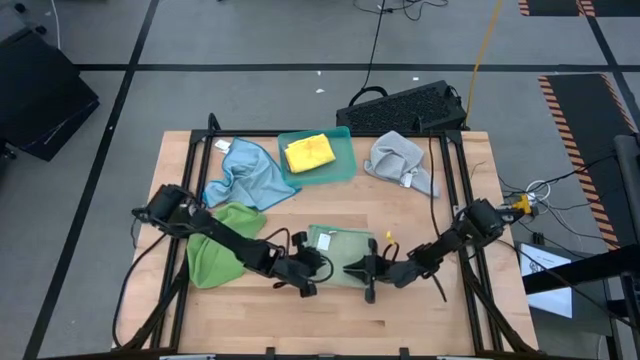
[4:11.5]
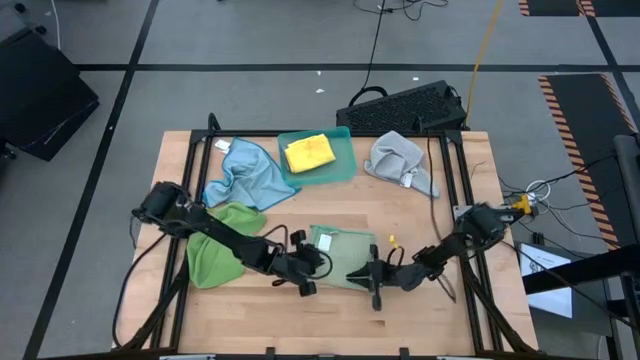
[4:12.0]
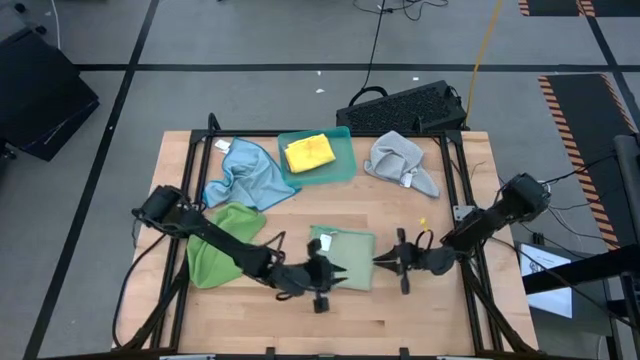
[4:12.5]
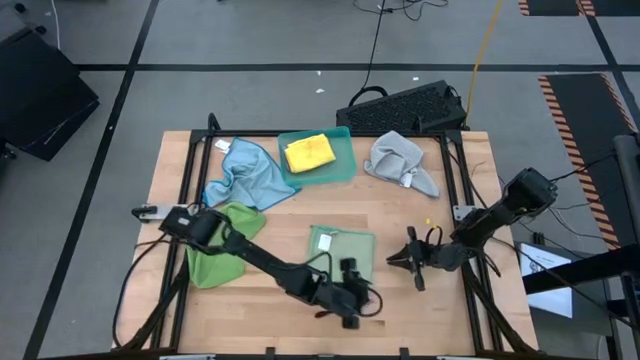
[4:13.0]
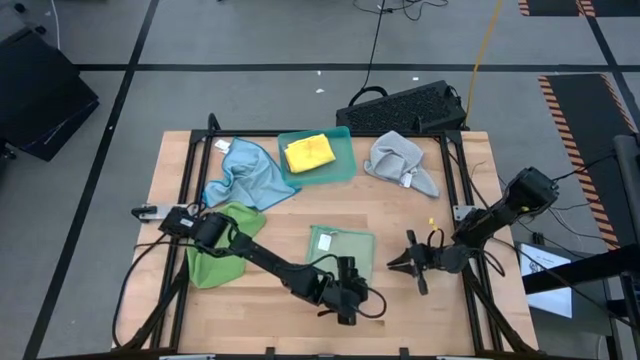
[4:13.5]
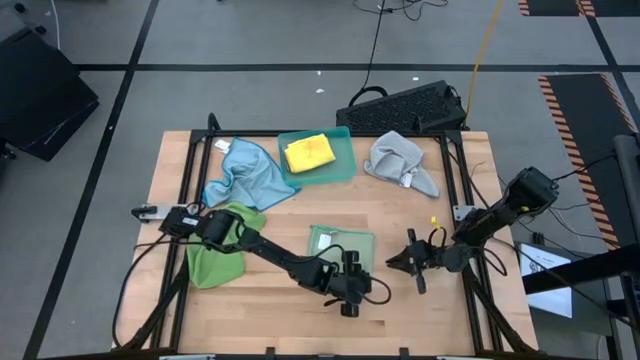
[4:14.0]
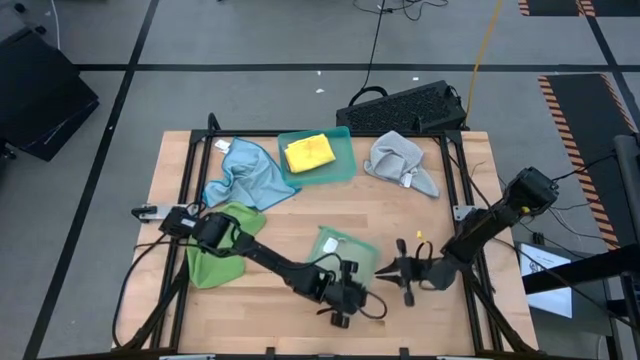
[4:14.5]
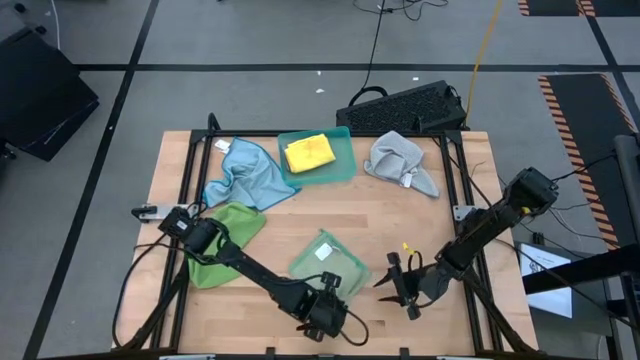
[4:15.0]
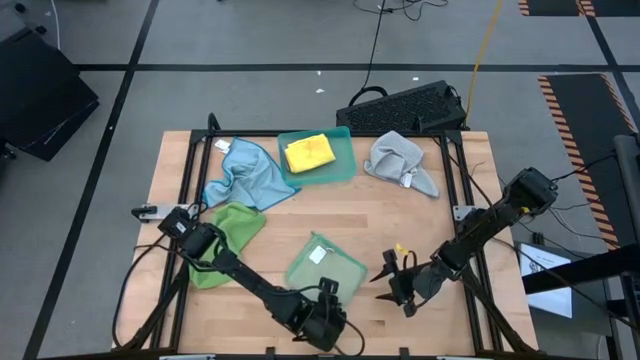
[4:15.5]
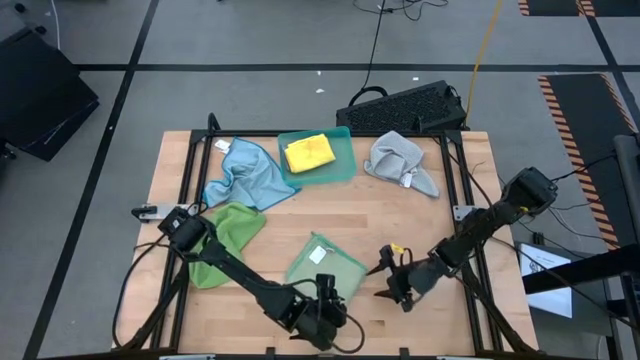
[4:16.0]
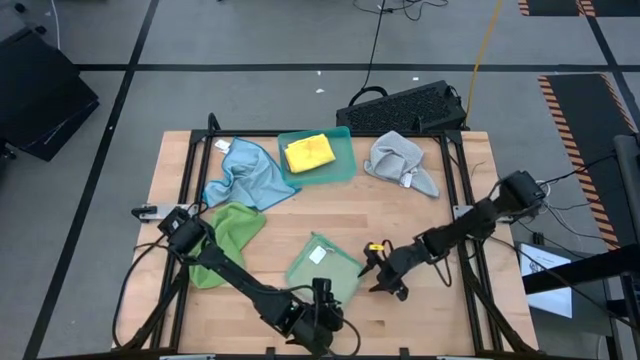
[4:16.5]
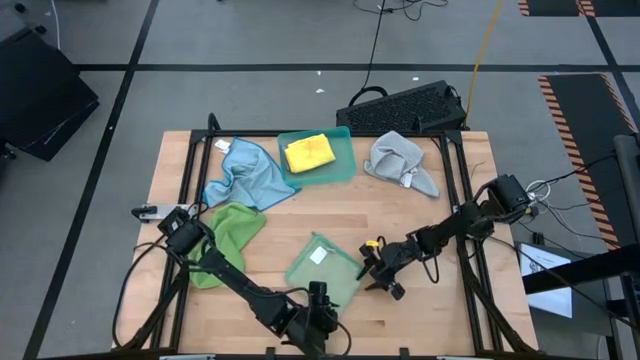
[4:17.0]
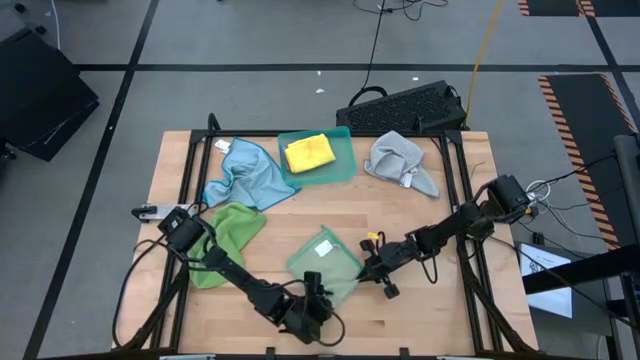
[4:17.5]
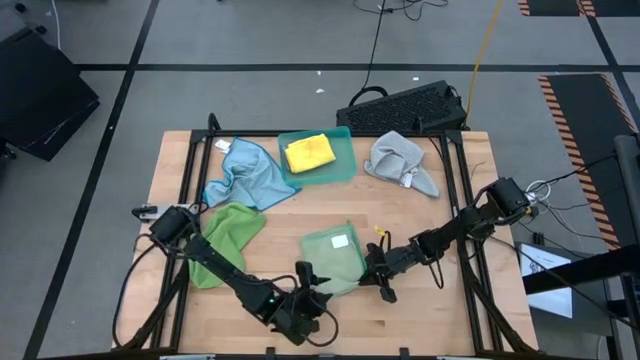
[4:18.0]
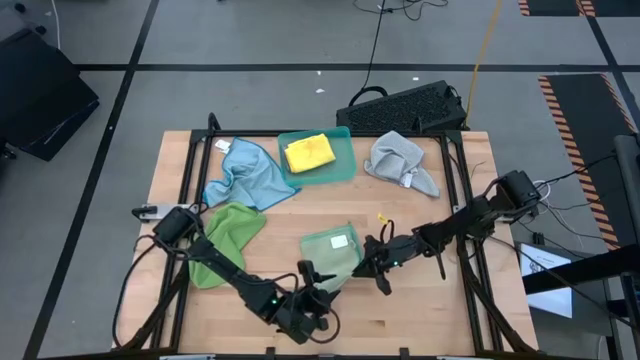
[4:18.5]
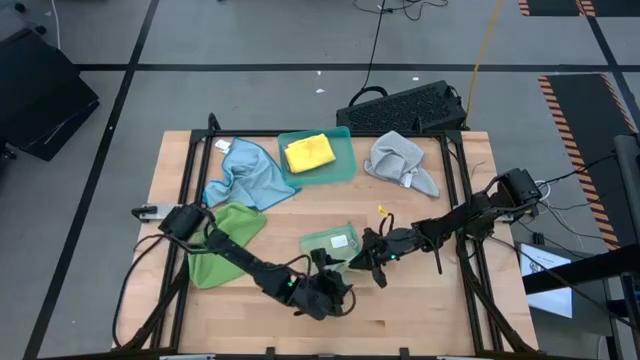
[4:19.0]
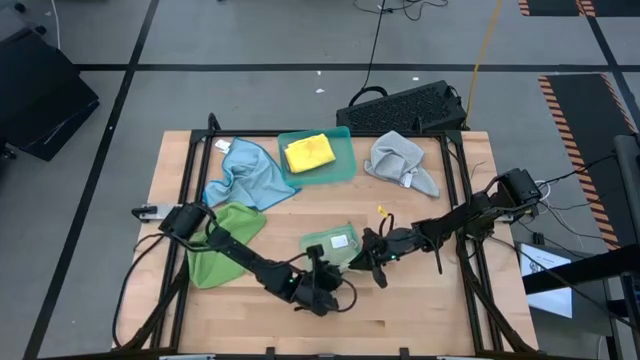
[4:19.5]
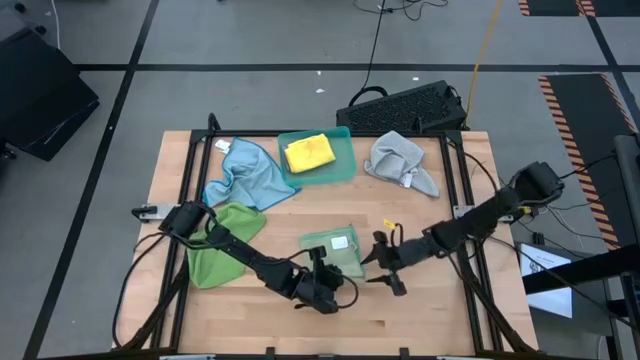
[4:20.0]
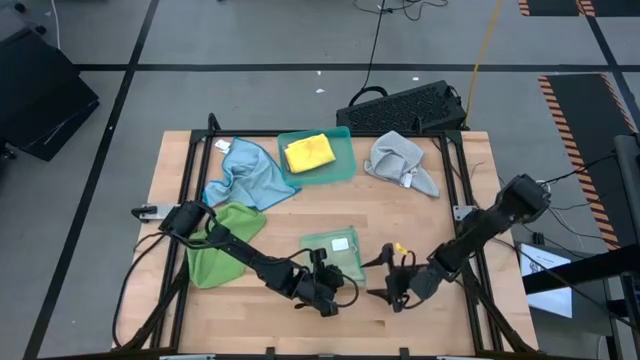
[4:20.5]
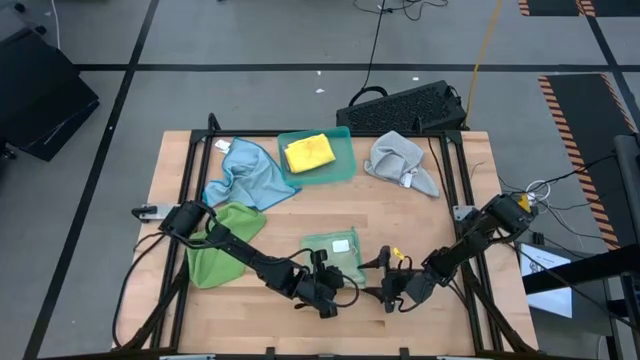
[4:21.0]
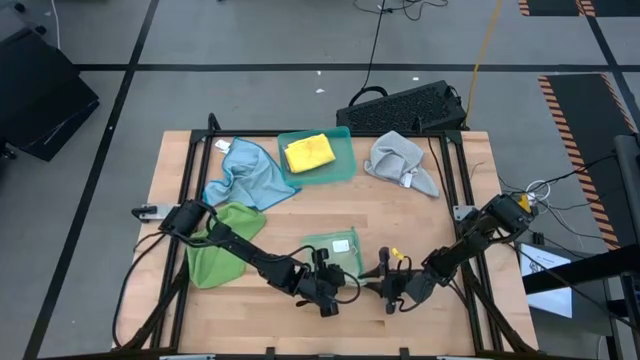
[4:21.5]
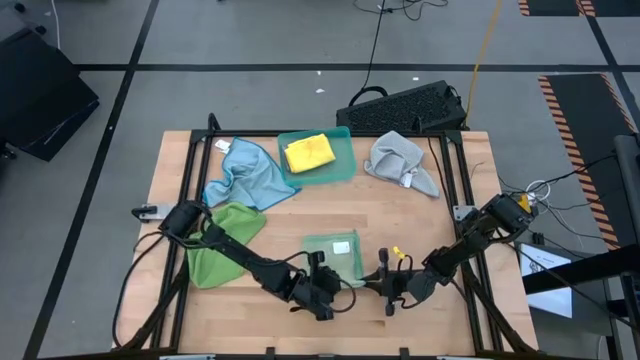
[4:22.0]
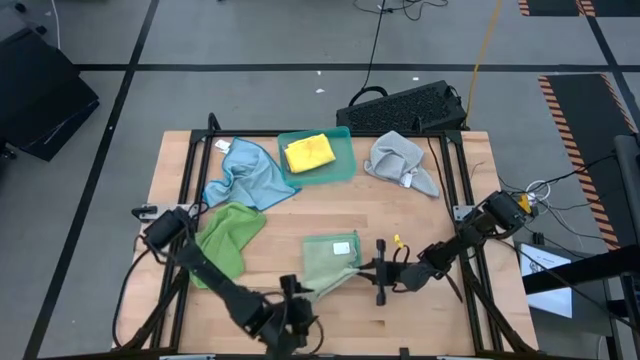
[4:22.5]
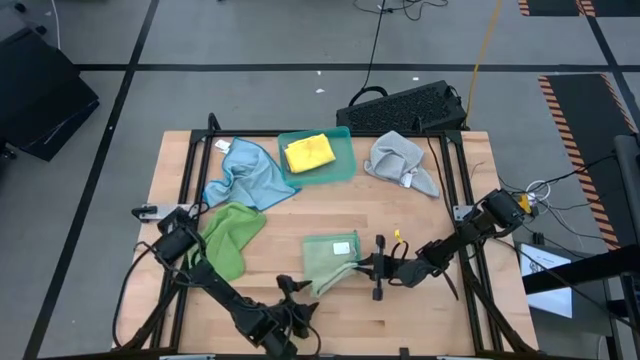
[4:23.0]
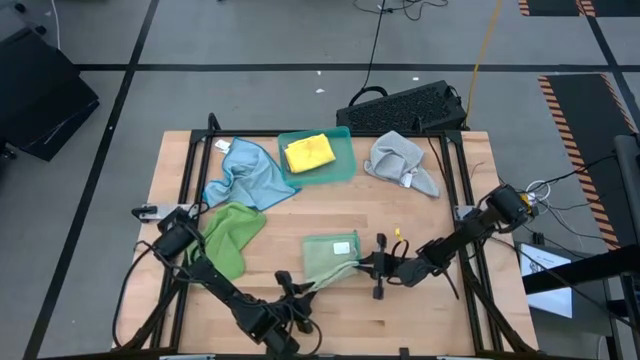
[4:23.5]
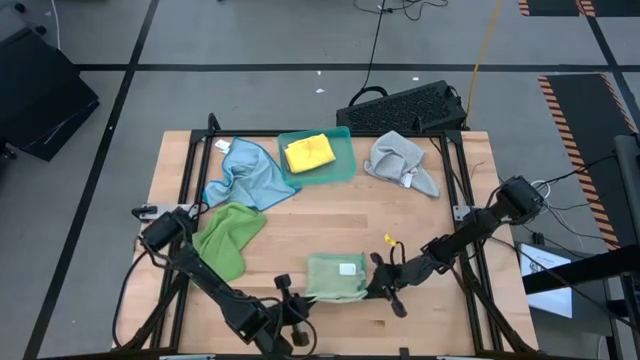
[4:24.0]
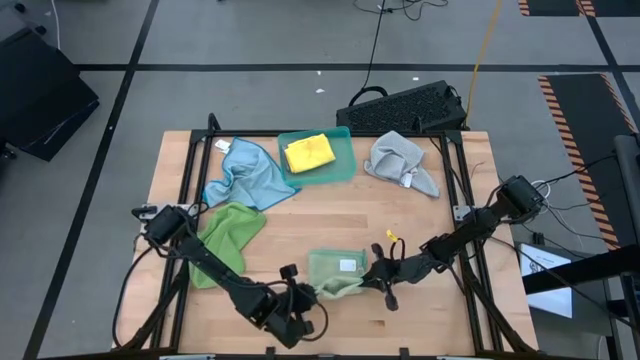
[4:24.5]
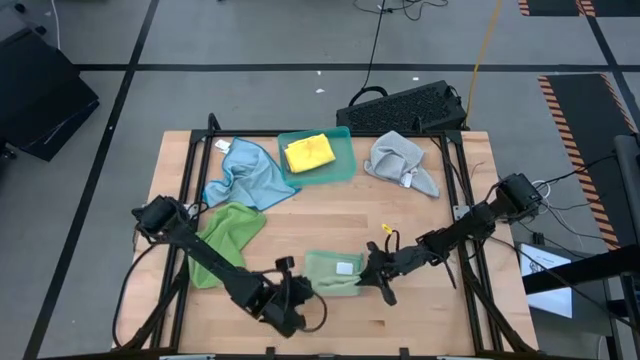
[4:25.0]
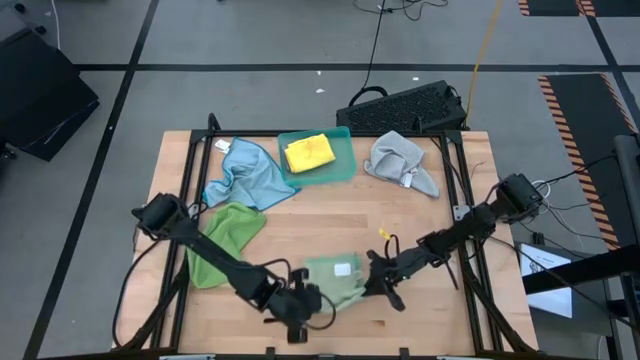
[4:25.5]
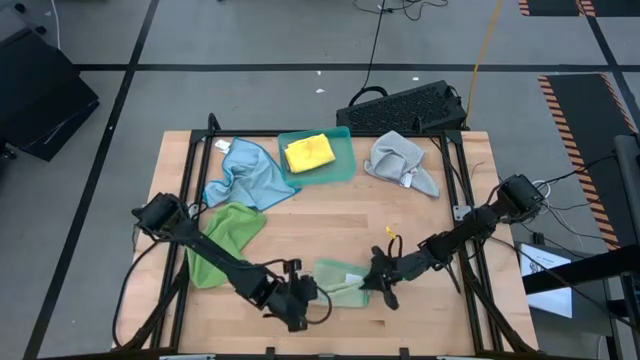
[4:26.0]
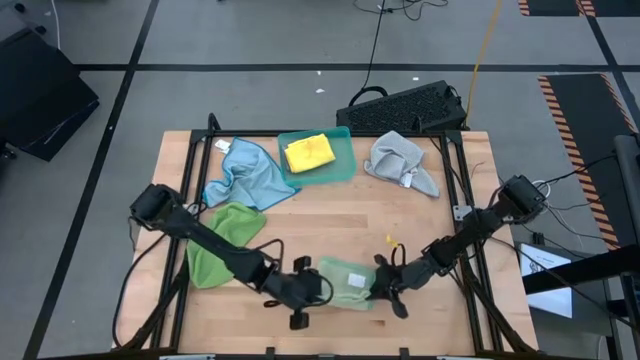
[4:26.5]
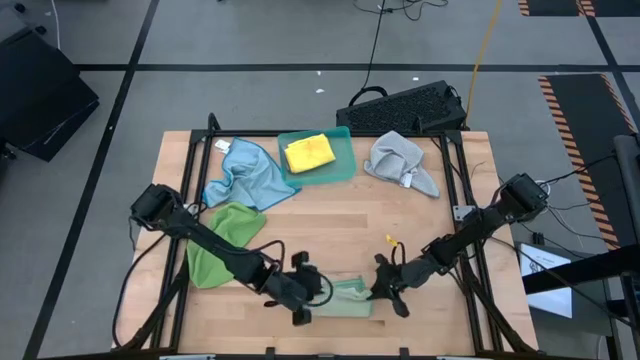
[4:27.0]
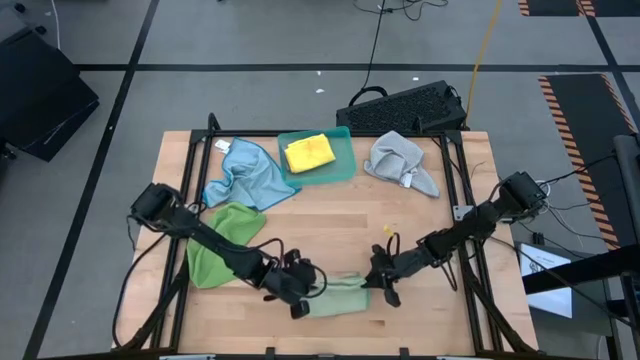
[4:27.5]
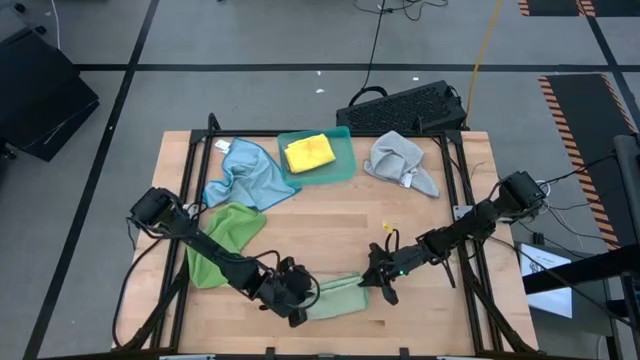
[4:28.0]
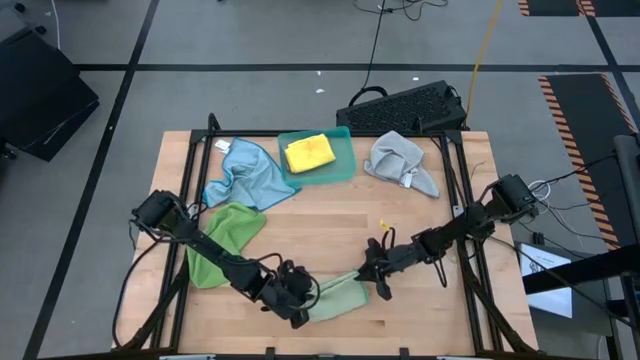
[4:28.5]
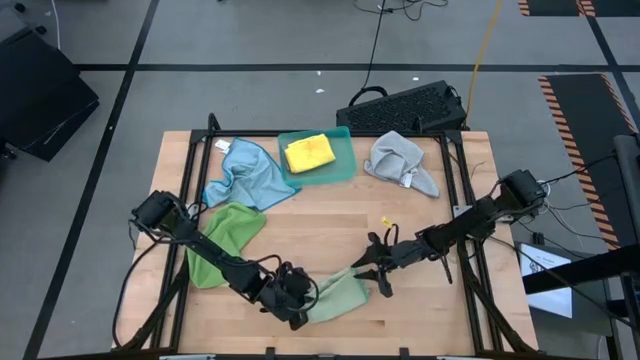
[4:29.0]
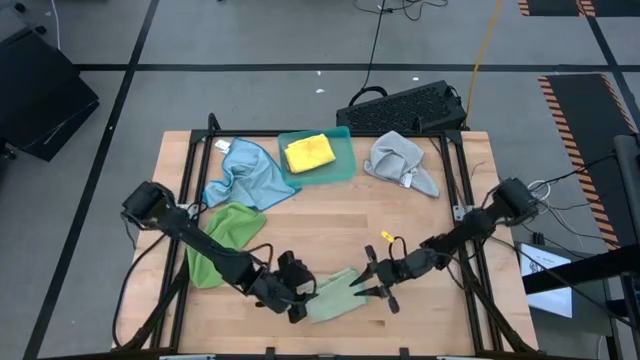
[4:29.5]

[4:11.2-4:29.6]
Task: Fold microfiber towels
Fold the light green microfiber cloth

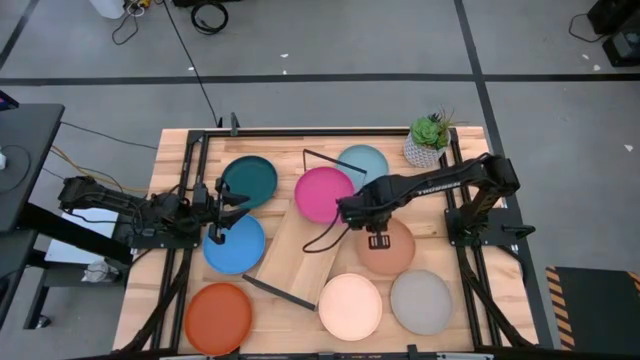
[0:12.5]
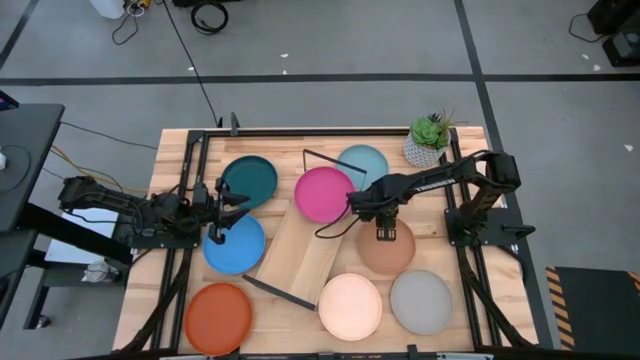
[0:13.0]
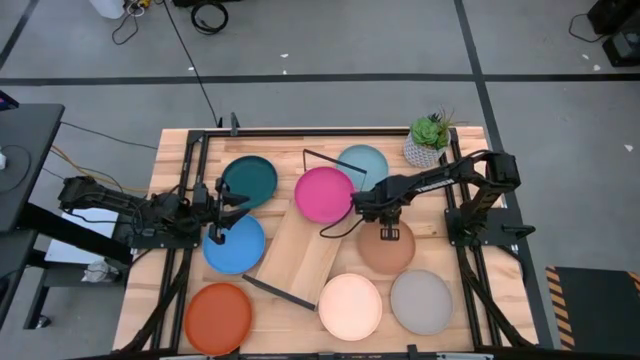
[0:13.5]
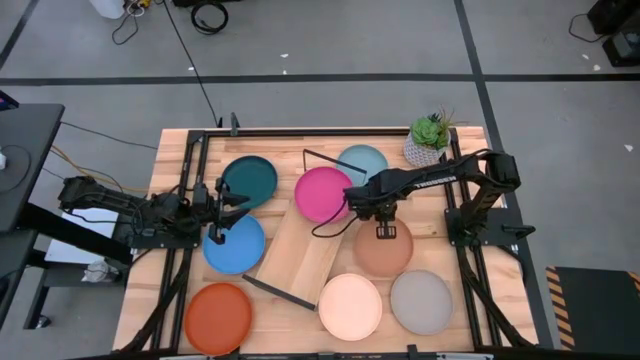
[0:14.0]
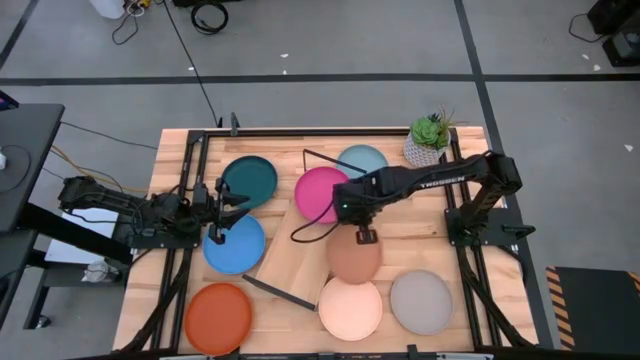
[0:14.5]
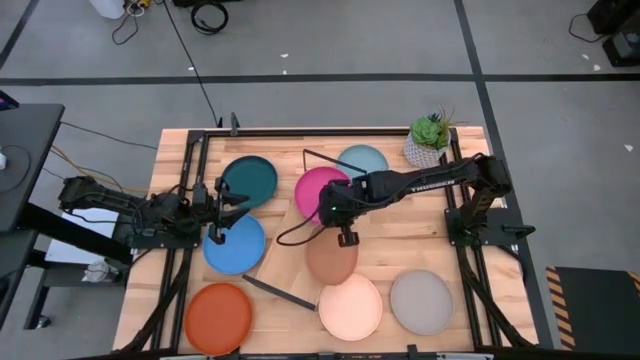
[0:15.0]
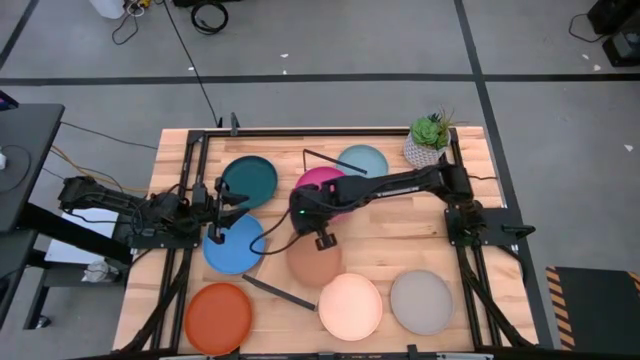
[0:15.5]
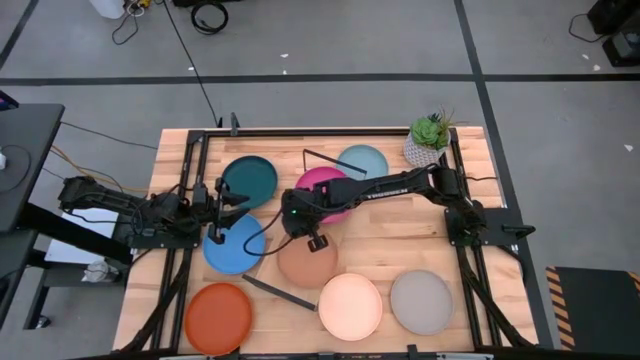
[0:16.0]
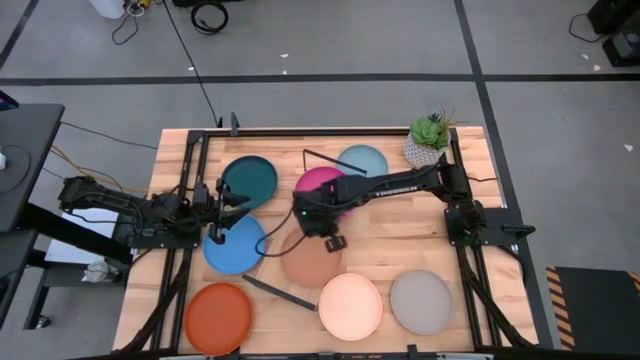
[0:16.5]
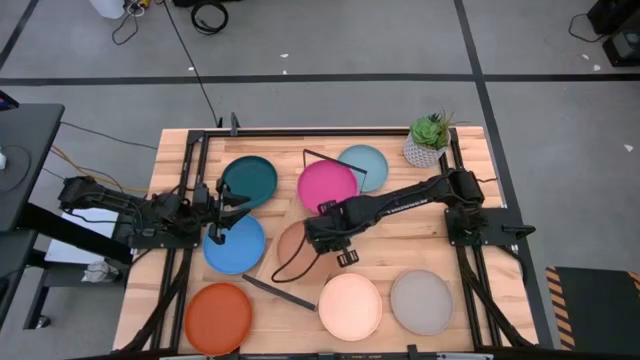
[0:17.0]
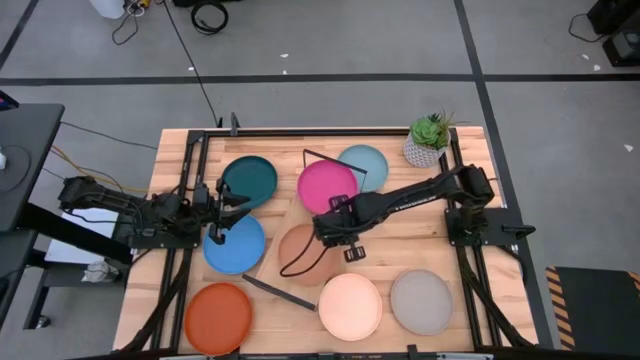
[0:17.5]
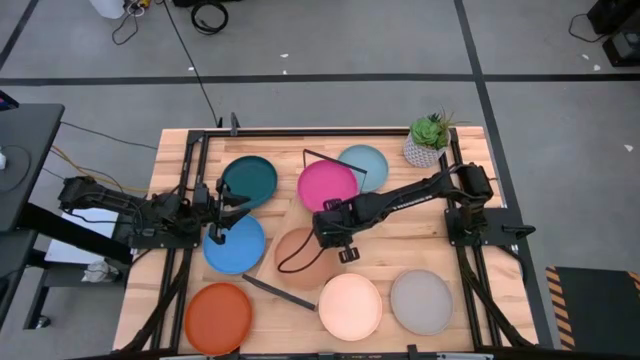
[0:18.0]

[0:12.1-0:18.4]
Task: Place and stack plates onto a shelf
Put the brown plate on the shelf
